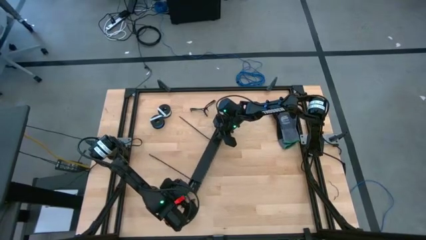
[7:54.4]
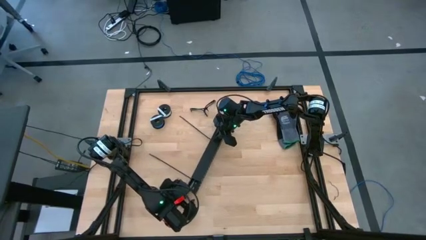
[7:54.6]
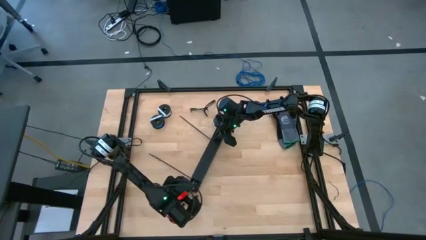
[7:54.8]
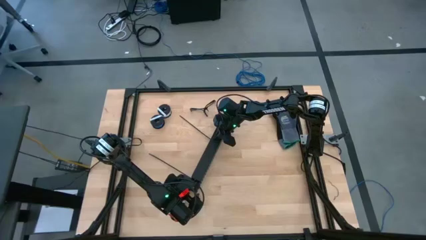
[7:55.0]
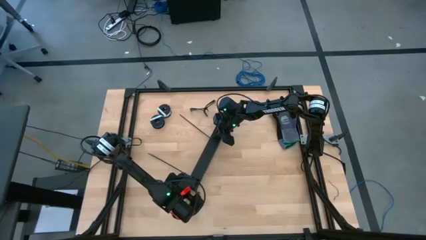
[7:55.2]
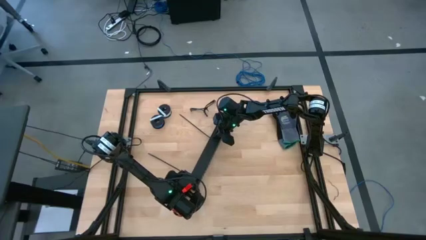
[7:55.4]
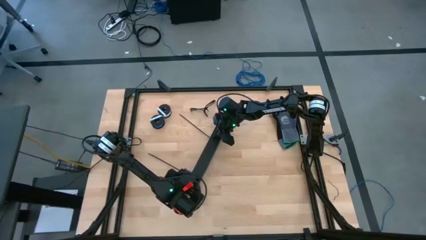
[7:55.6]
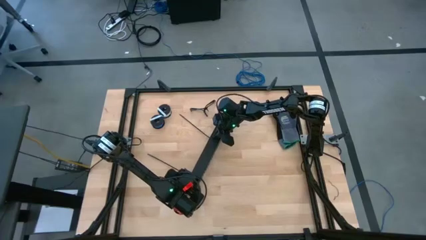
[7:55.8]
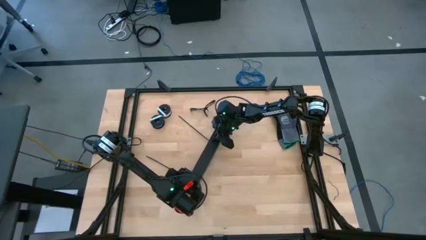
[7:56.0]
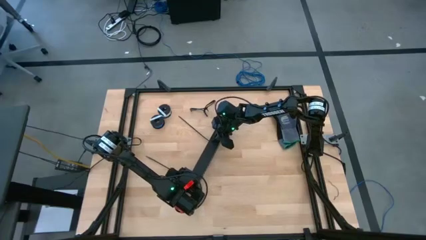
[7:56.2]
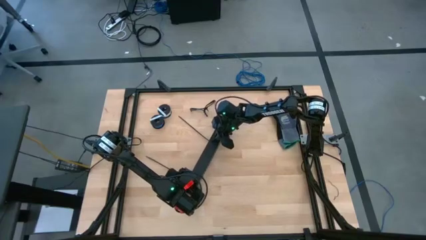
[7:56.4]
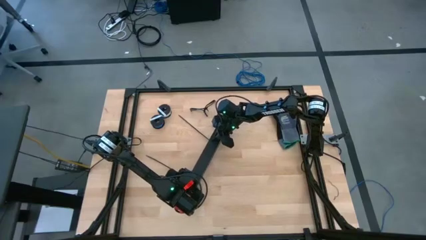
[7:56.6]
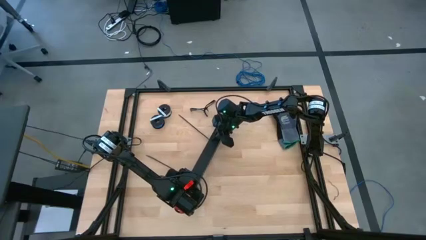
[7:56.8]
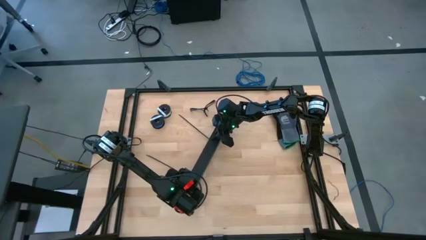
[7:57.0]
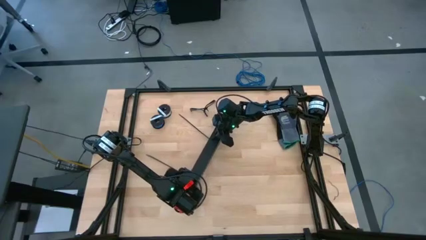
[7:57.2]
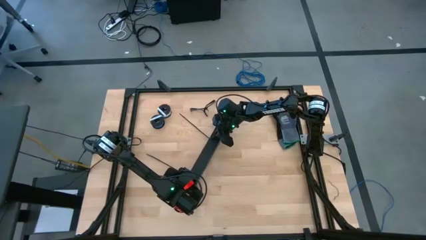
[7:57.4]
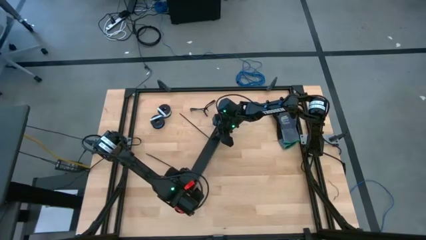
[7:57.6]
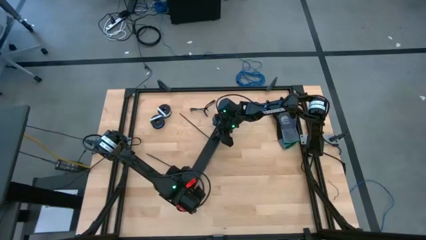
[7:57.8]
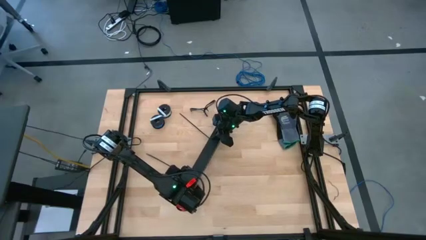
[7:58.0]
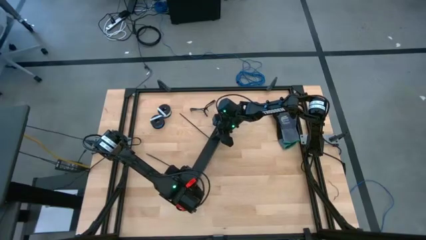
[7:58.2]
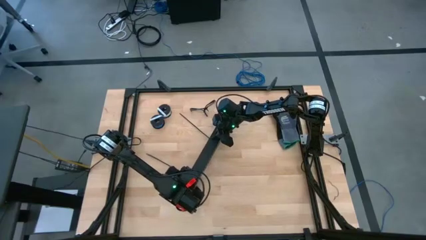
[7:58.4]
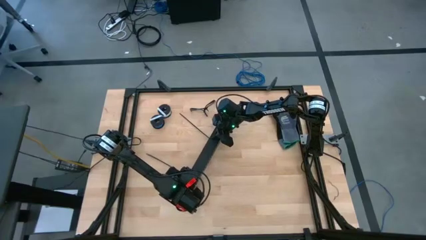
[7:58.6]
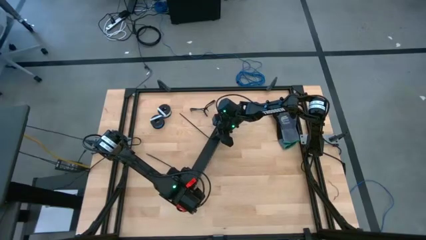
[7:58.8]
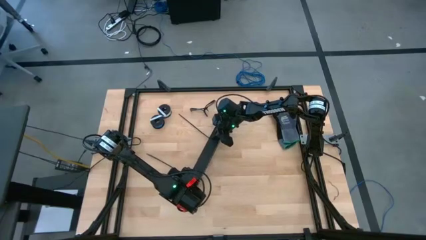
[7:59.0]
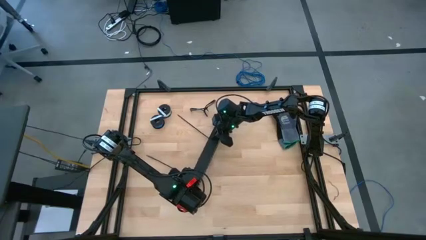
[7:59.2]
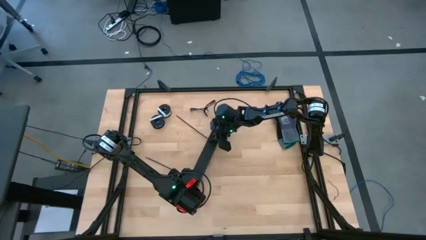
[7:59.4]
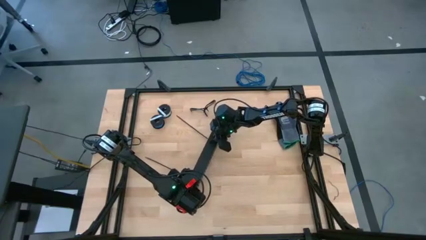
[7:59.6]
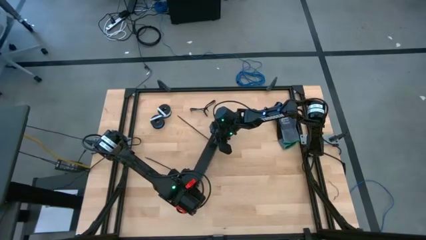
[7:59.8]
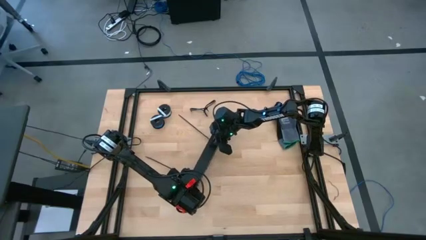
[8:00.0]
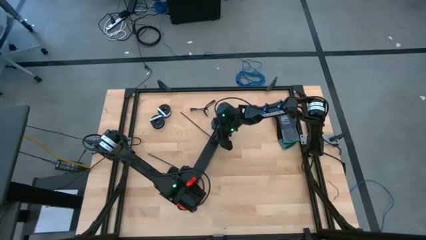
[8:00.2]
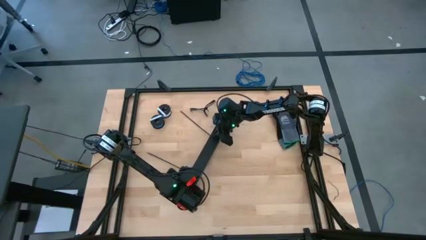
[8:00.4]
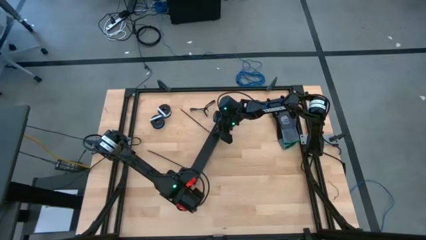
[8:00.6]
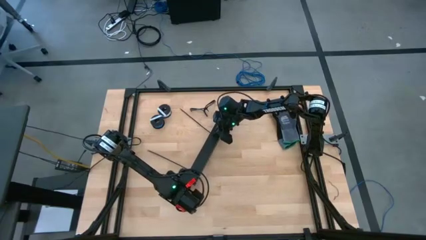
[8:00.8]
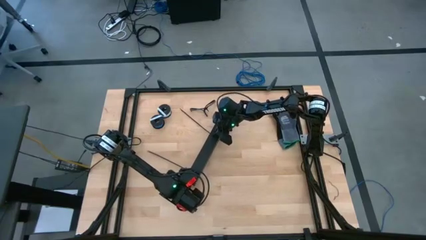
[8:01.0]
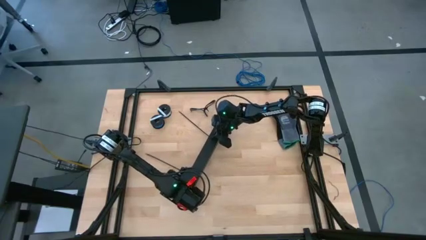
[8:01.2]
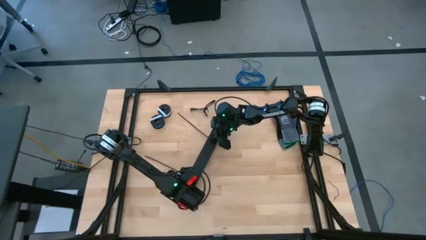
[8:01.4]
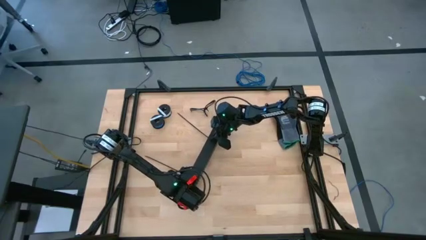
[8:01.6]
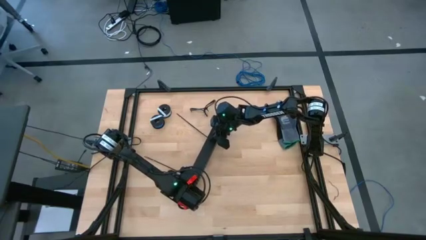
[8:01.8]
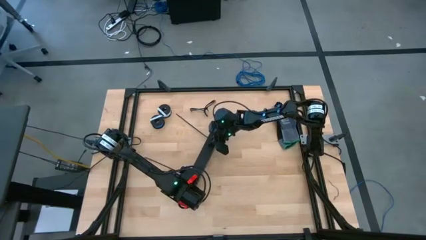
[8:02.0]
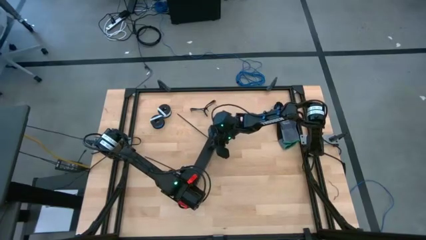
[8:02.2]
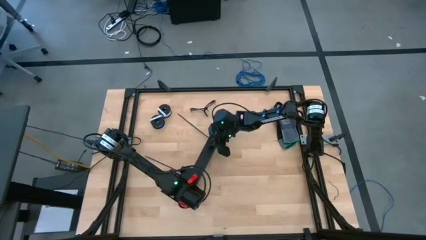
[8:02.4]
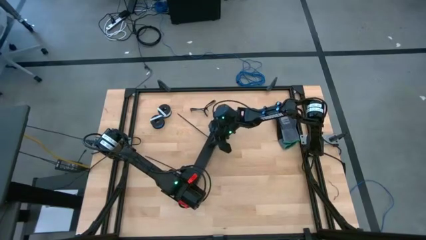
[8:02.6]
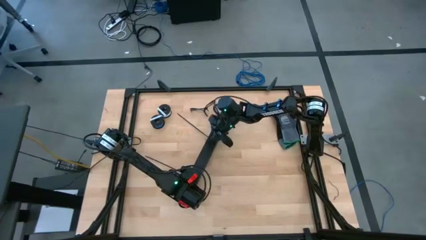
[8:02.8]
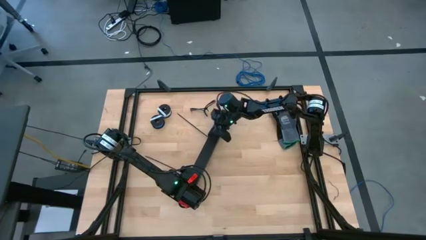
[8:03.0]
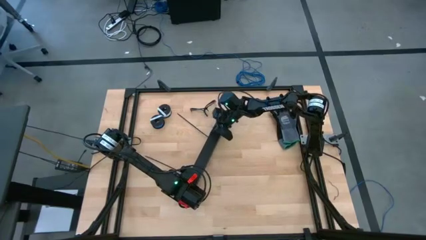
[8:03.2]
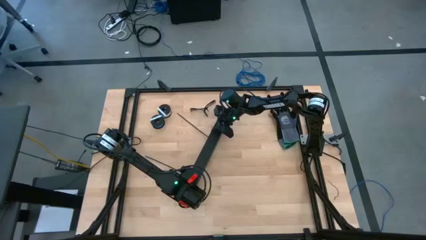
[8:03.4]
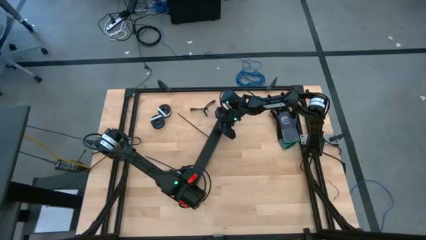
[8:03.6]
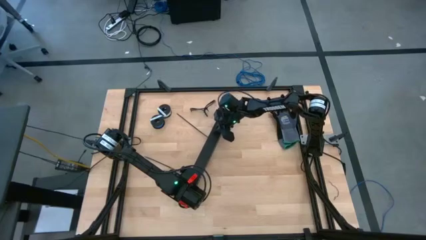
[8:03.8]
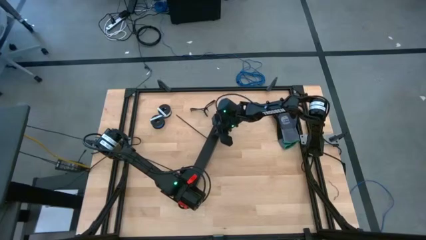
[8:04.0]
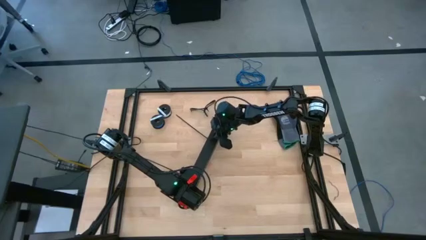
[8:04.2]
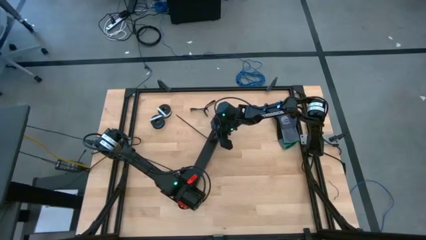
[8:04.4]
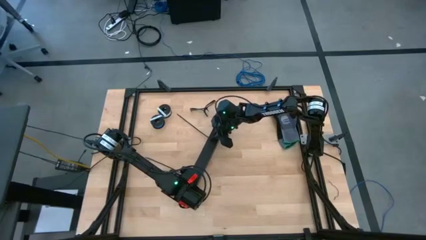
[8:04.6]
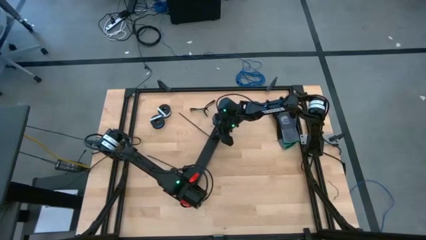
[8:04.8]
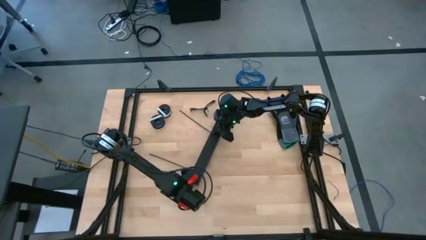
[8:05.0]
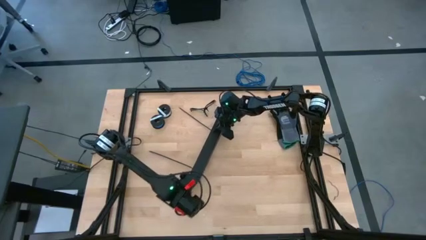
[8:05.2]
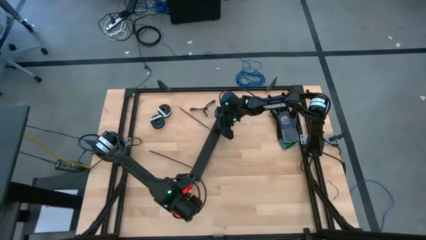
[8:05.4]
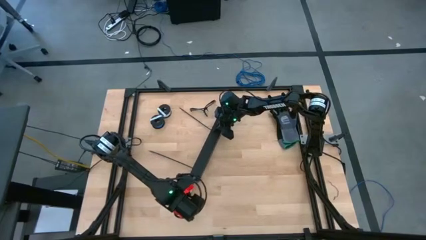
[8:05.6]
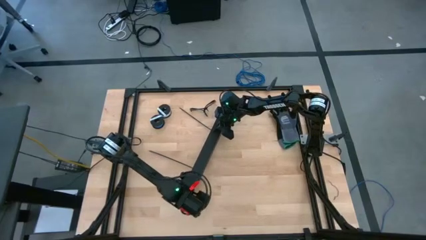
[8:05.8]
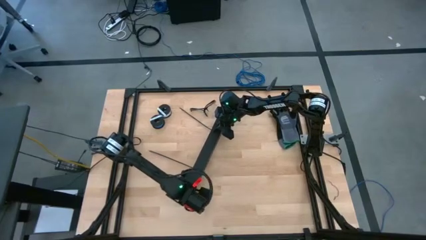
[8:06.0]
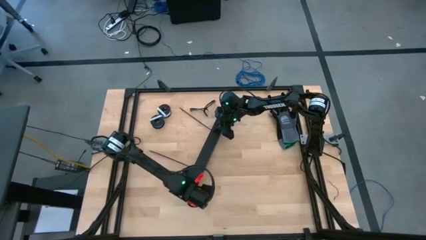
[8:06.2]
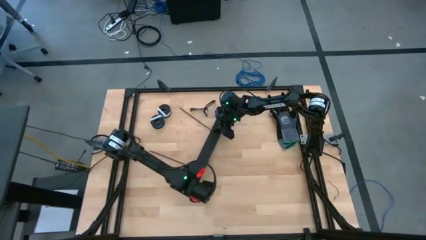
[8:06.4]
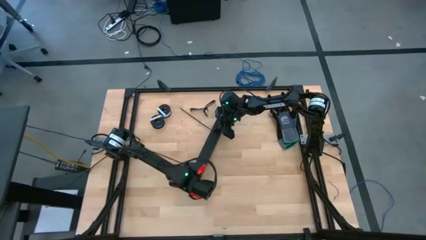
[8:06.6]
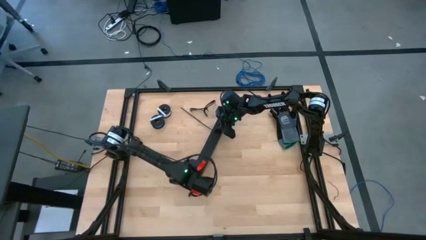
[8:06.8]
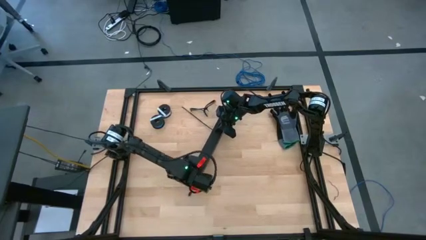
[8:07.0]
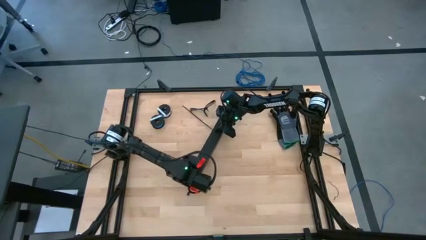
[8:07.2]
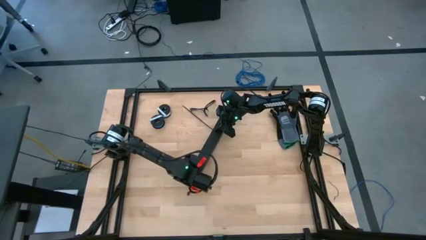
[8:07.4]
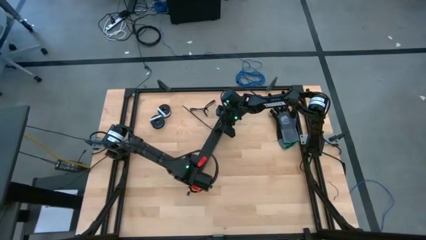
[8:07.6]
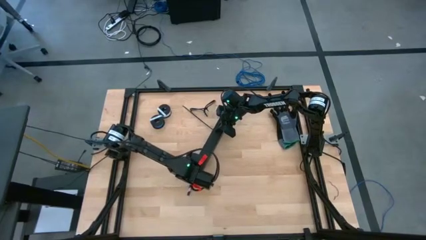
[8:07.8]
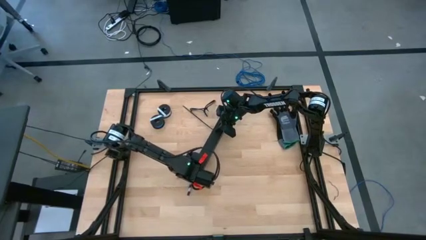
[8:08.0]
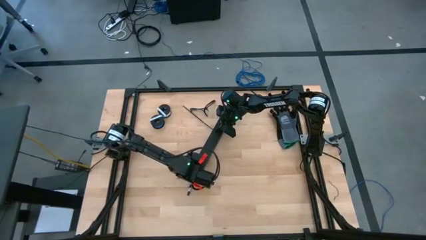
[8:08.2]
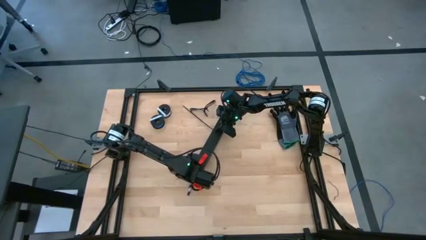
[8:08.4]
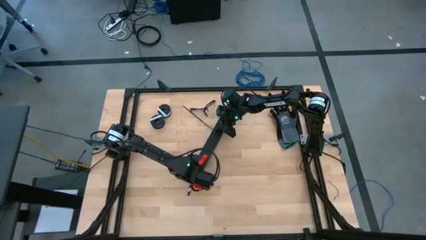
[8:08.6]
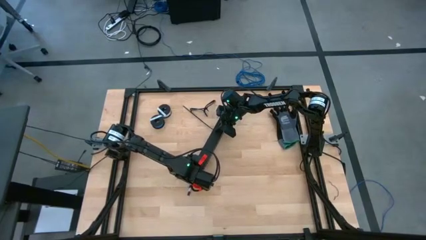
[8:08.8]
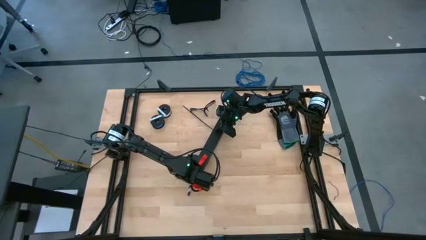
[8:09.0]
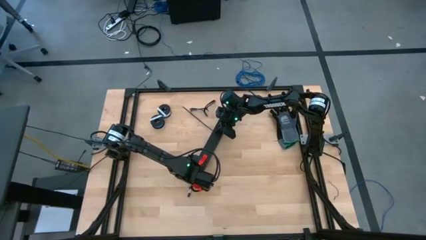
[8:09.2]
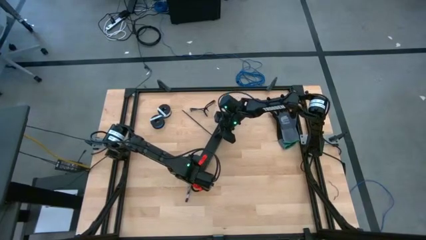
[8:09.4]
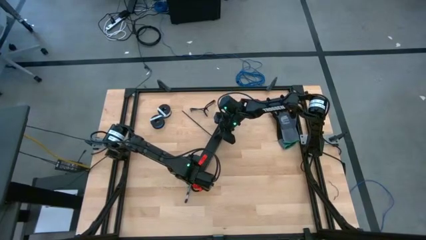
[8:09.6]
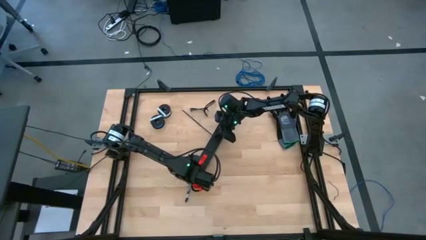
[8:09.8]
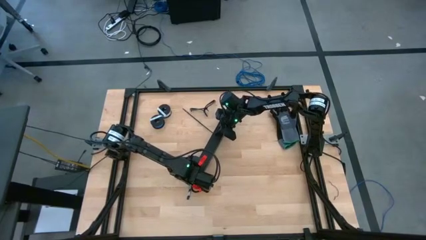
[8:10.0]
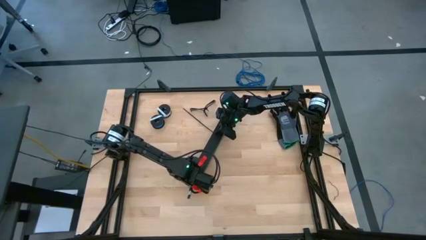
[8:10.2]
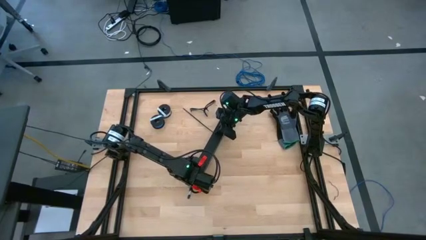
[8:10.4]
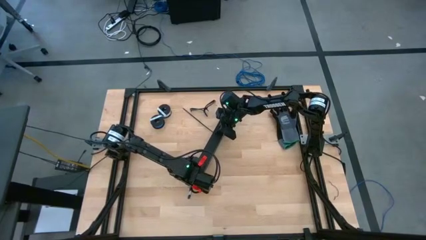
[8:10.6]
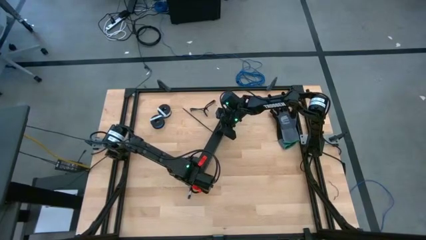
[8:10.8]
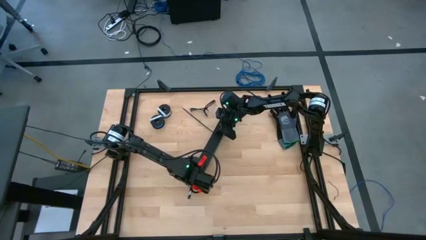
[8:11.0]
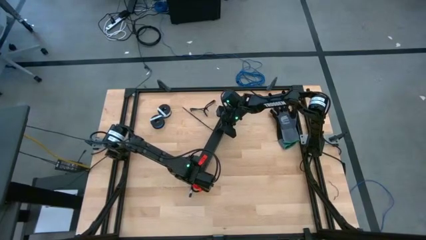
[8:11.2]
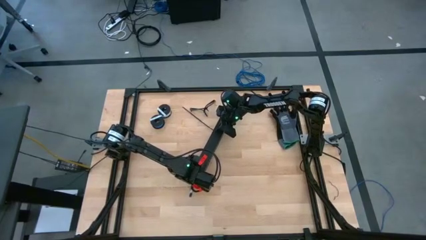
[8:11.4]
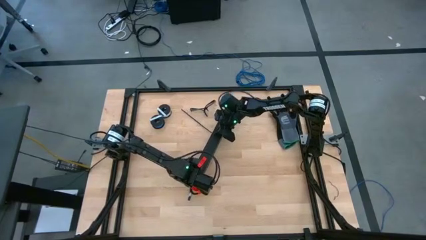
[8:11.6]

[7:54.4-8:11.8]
Task: Ziptie cables
Insert the black cover of the black cable duct
